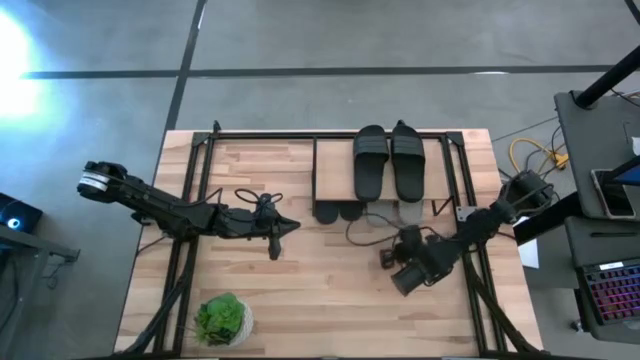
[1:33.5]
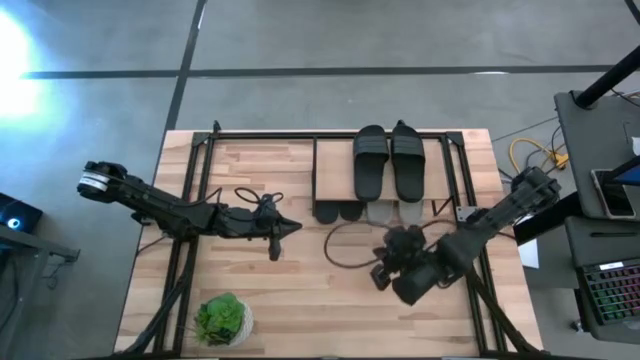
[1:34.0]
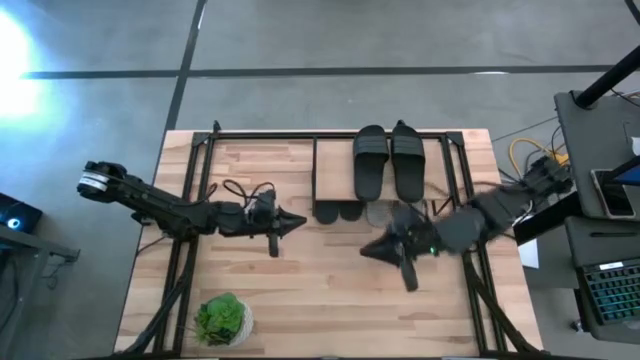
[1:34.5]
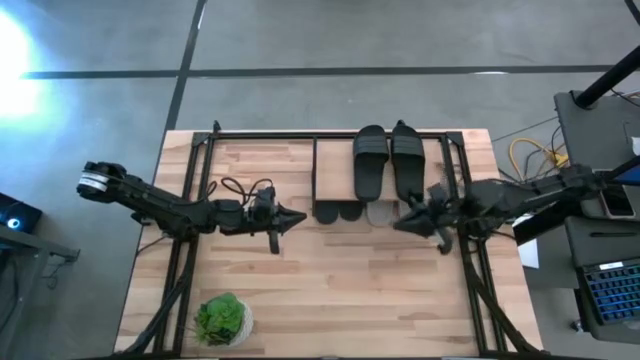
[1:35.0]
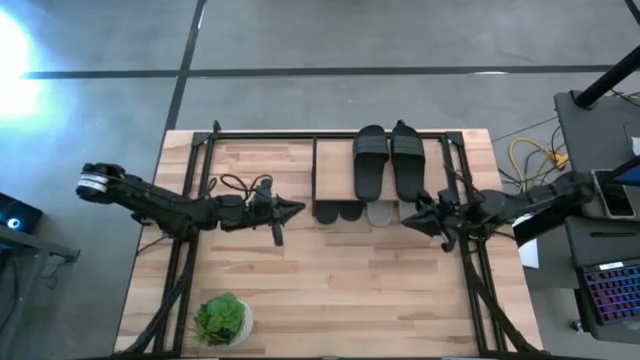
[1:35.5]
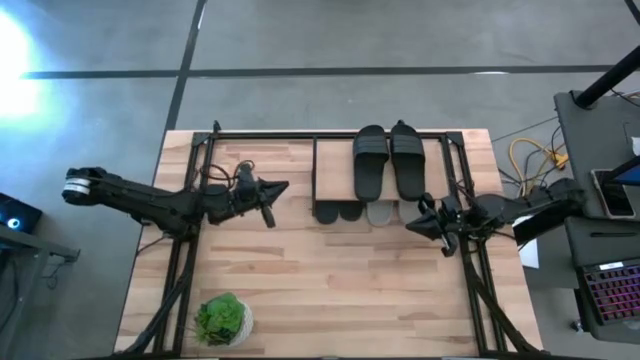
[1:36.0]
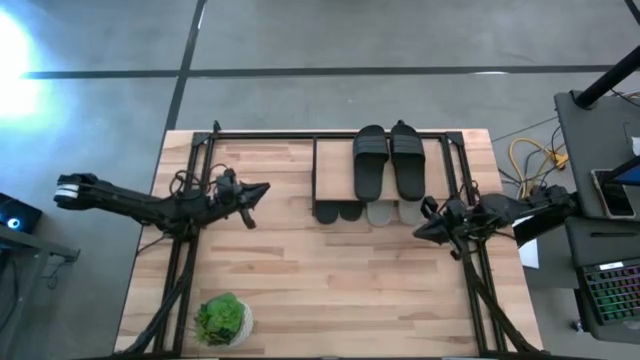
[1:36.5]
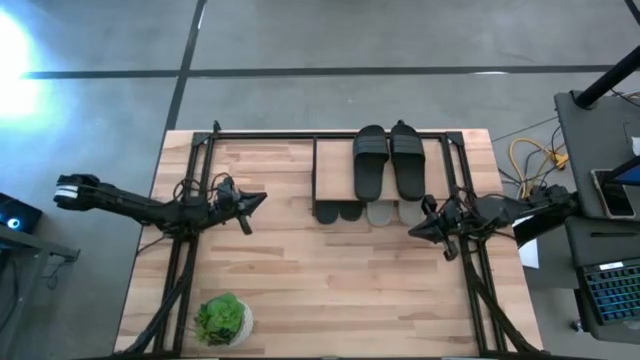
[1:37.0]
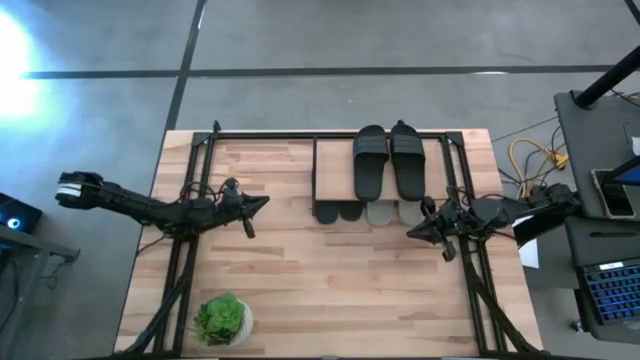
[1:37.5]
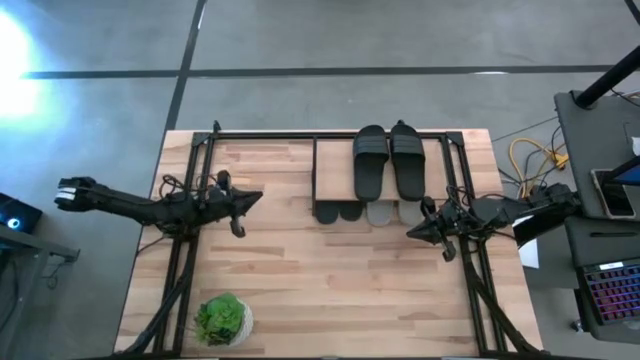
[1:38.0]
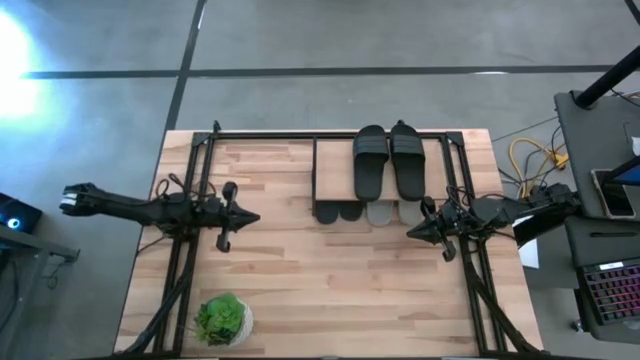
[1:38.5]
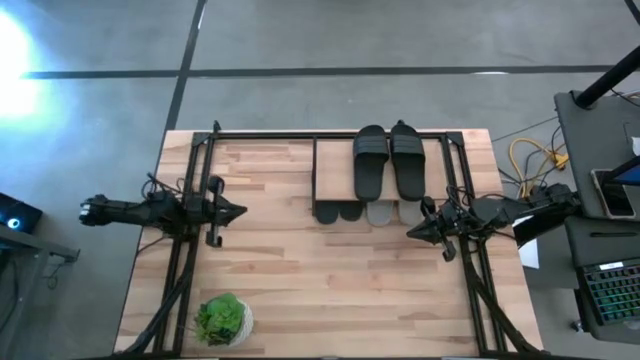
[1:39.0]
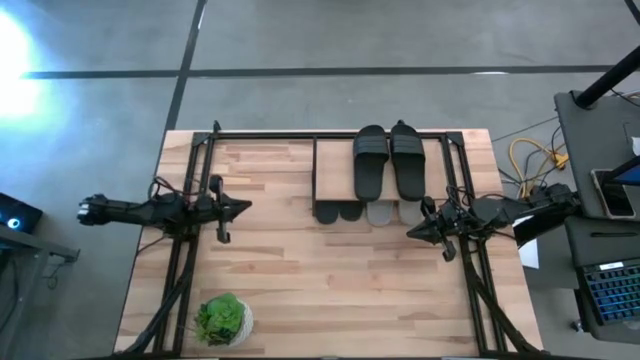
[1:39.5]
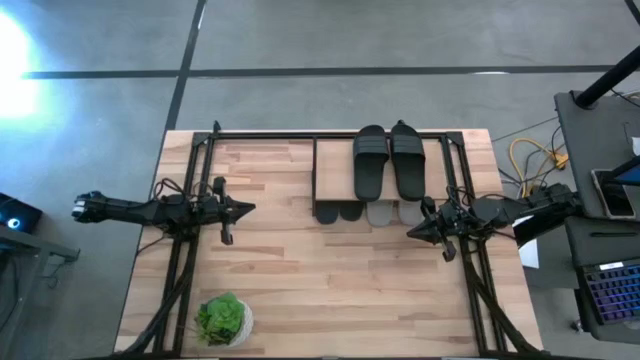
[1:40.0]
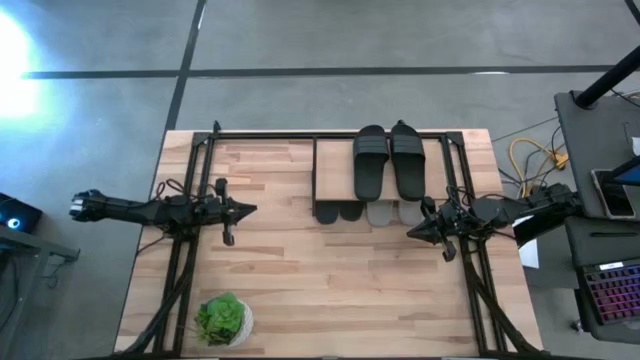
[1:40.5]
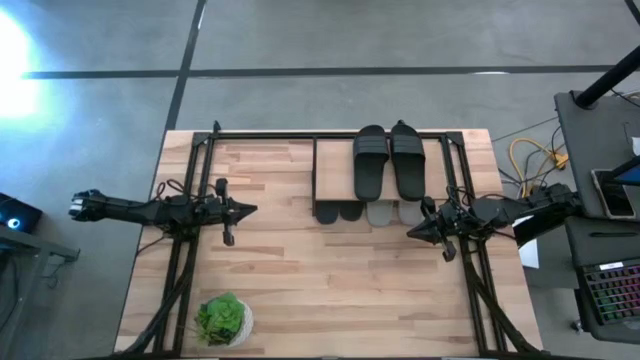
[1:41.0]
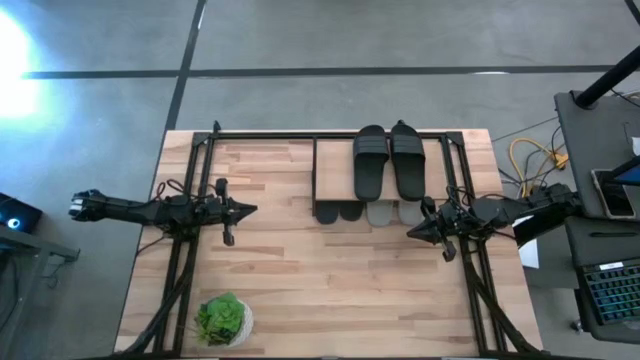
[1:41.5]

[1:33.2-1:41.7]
Task: Pick and place slides into the shelf
Return to Home Position

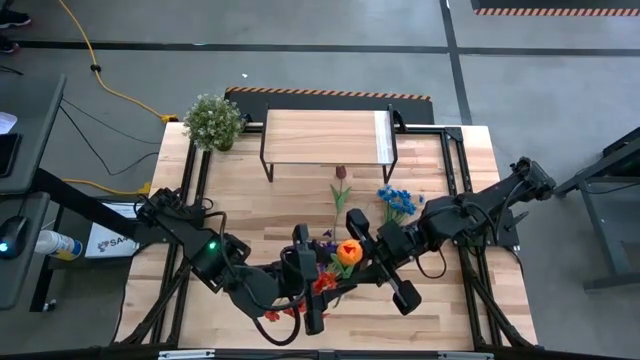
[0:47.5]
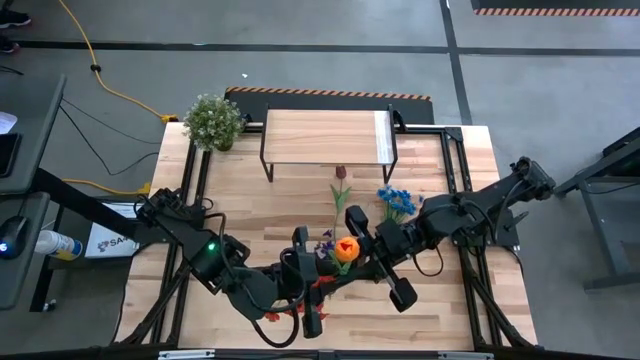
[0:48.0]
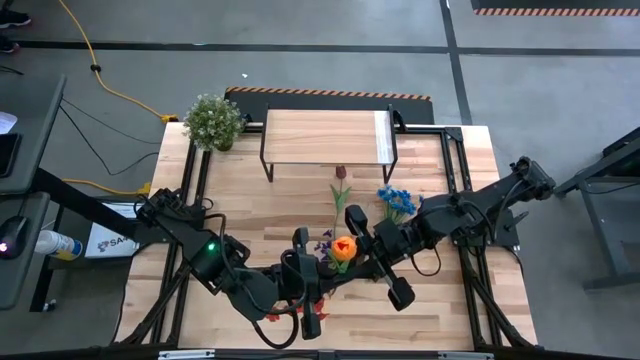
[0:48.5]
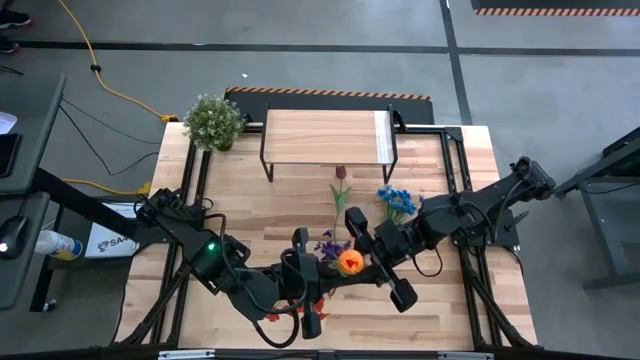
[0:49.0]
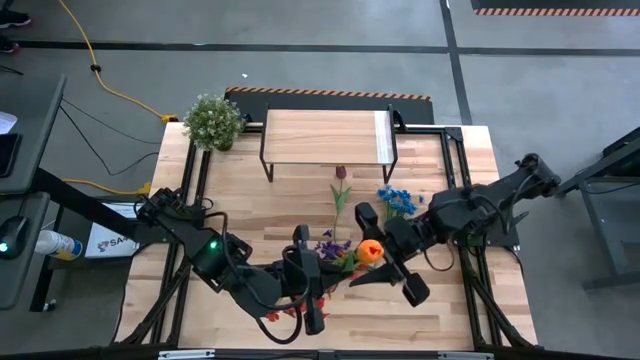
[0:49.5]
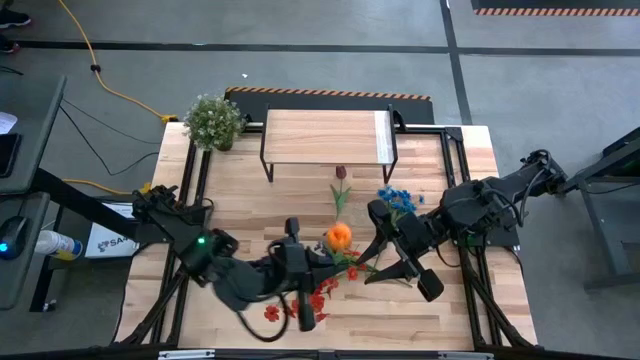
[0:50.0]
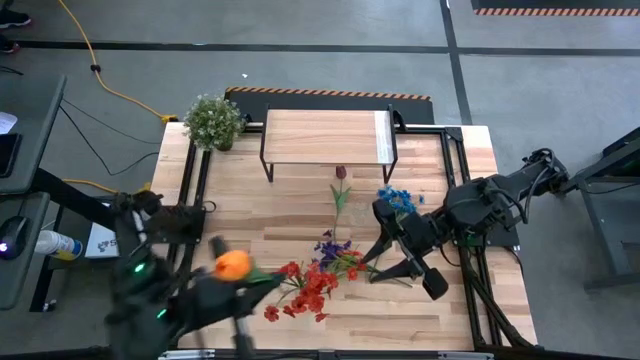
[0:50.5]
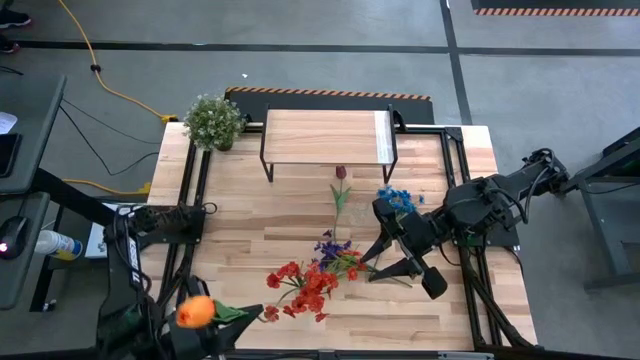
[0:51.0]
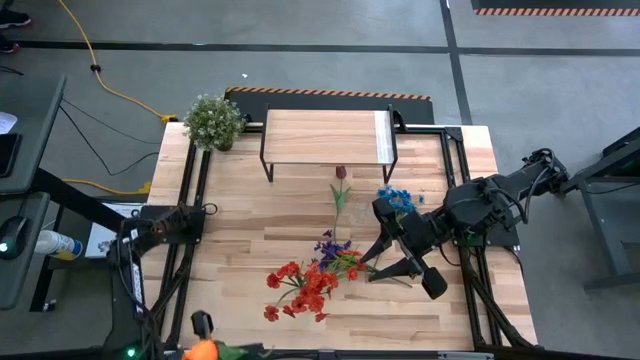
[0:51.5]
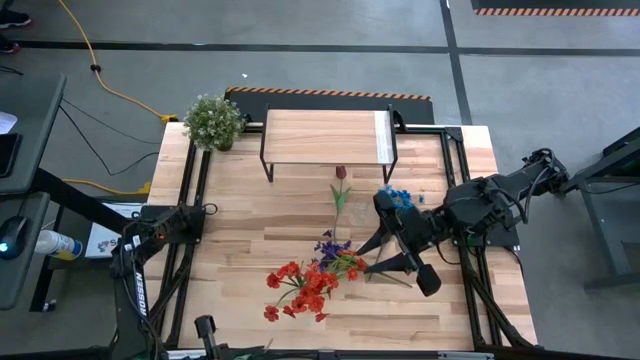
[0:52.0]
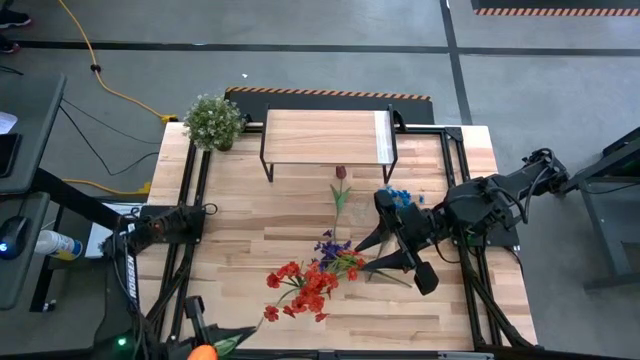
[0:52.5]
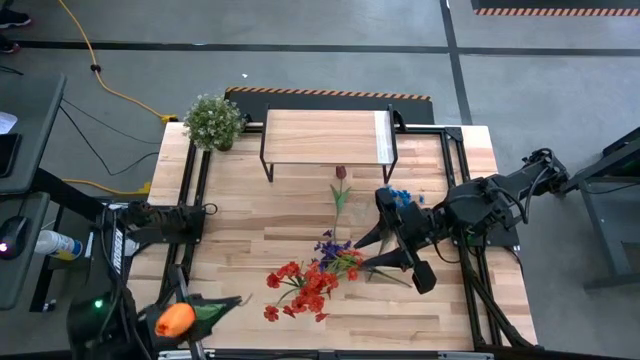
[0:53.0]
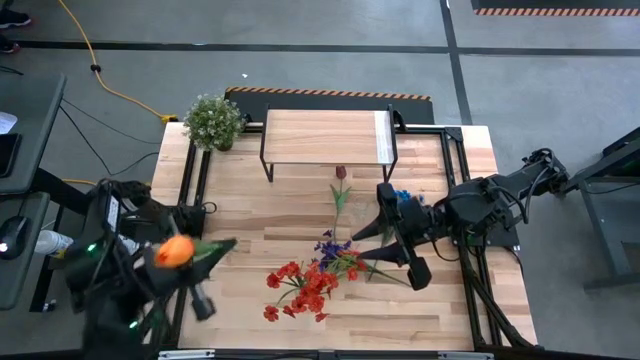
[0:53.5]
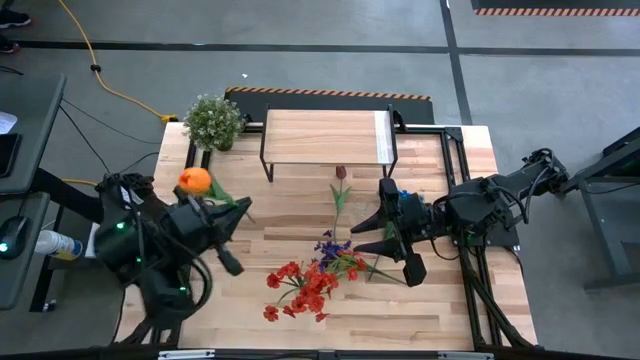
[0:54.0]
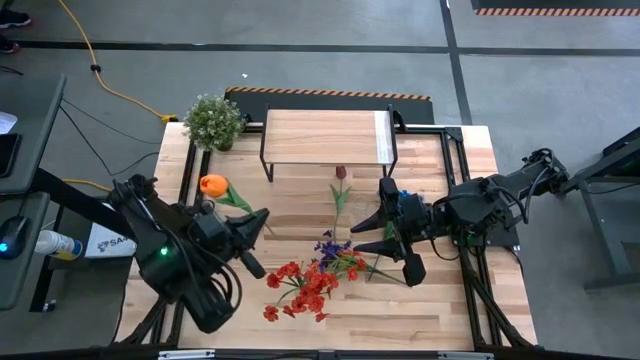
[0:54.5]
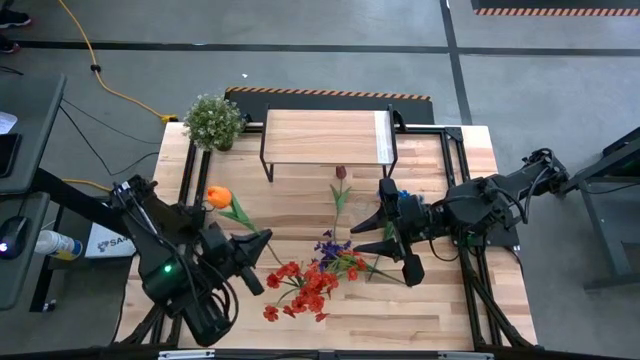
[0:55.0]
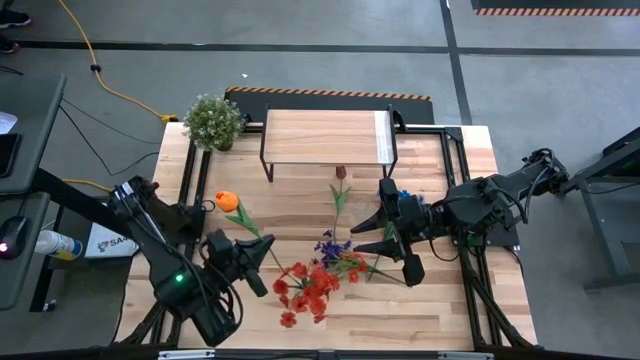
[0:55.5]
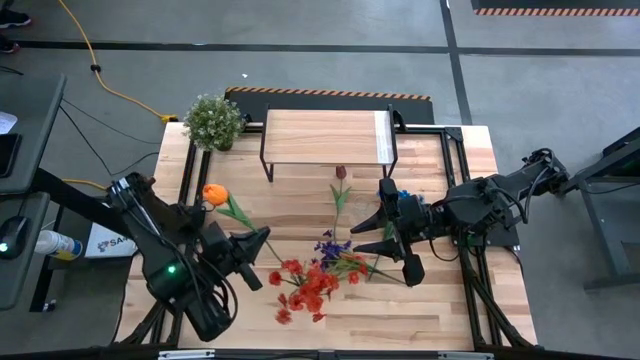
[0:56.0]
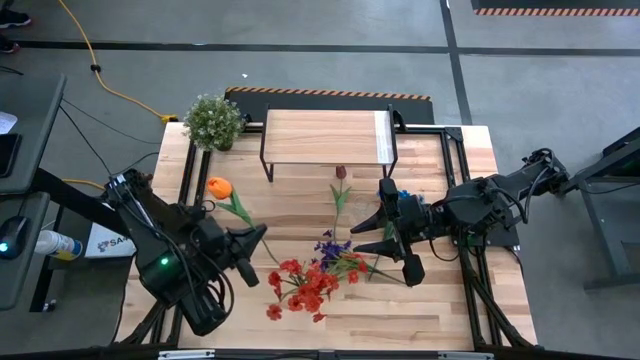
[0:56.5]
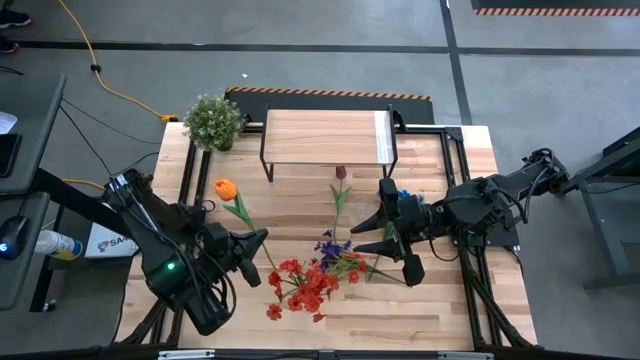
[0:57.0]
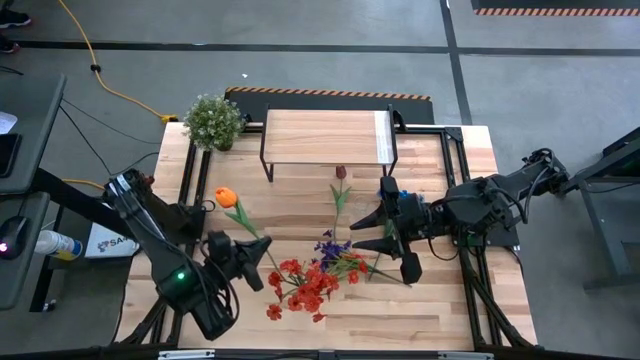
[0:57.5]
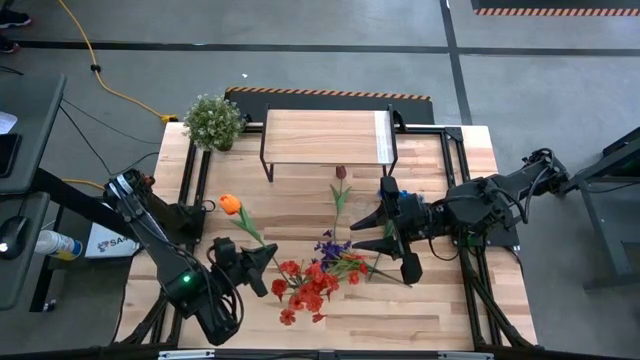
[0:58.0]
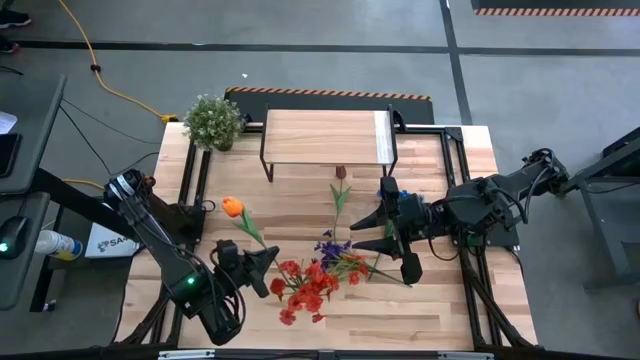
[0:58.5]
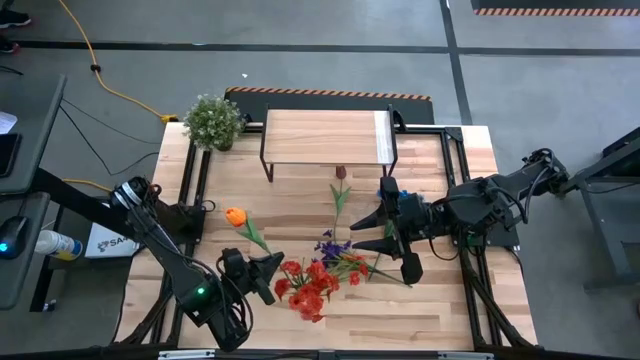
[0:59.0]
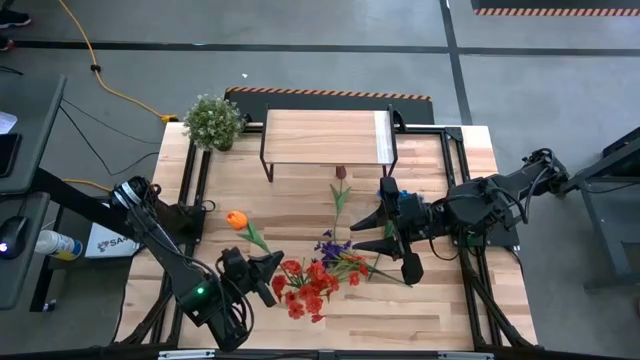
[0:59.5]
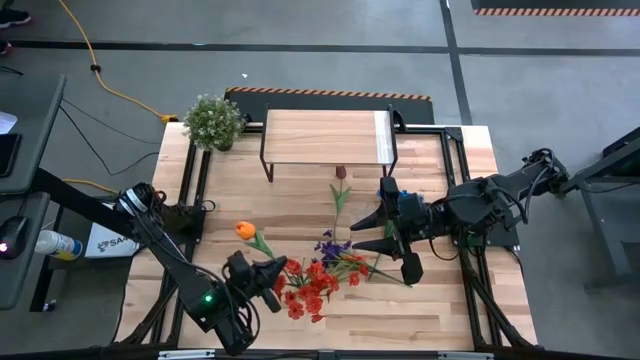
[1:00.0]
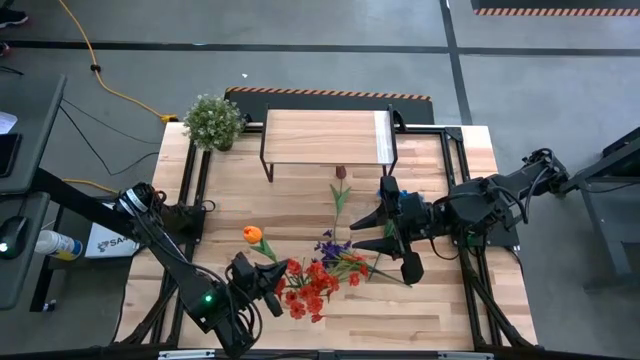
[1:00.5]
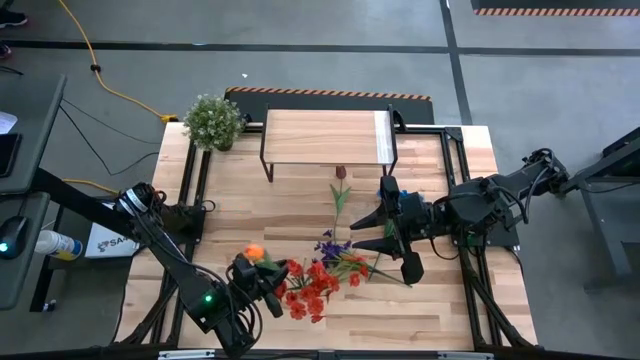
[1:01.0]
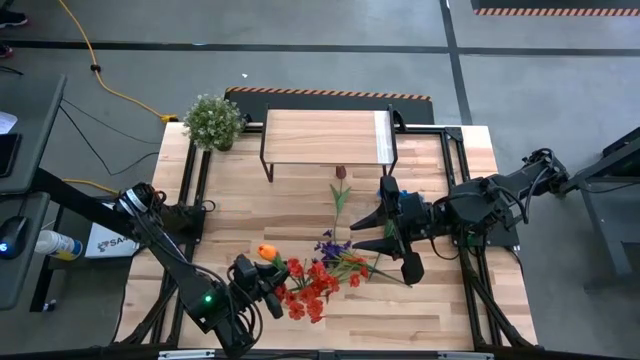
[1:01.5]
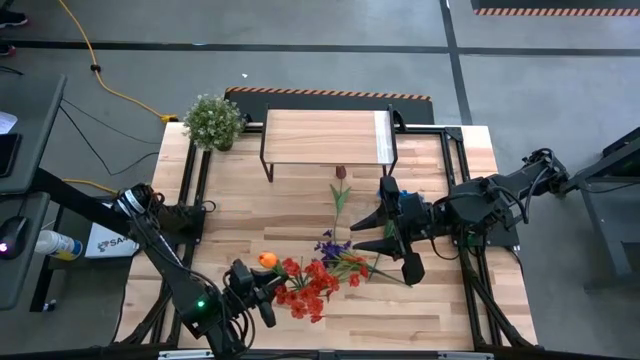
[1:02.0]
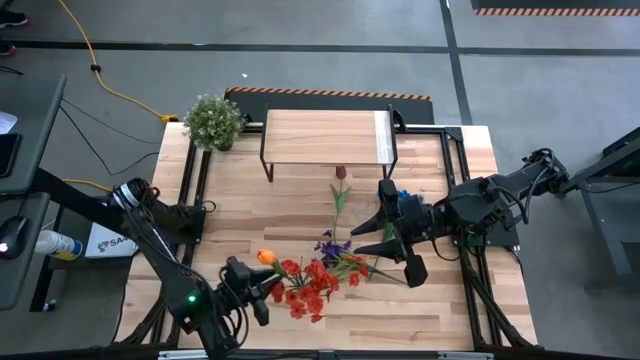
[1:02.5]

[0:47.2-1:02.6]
Task: Pick and place flowers into a vace then onto a shelf
Put the orange flower into the bottom transparent vase
